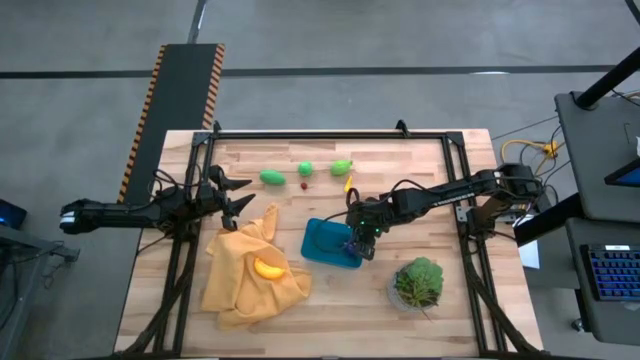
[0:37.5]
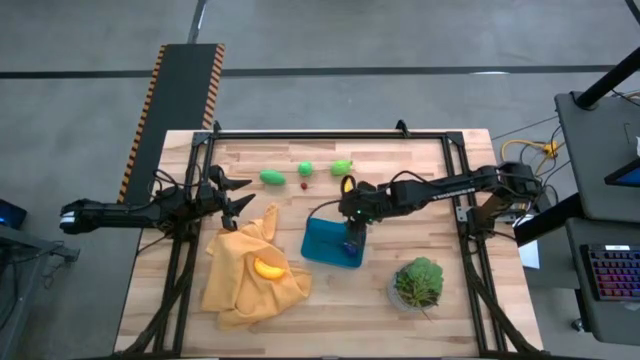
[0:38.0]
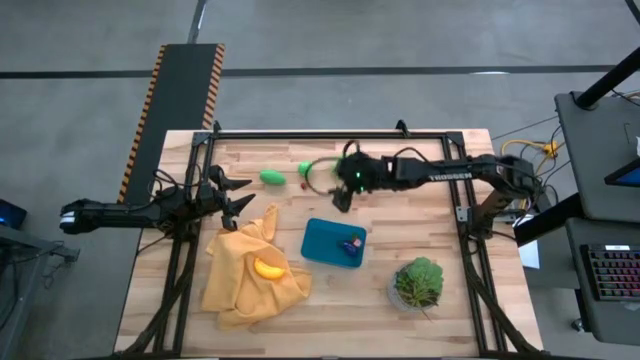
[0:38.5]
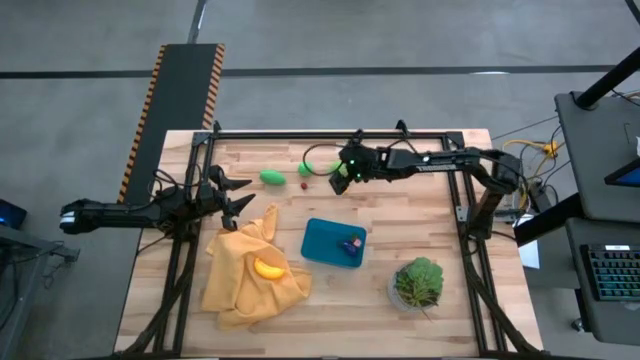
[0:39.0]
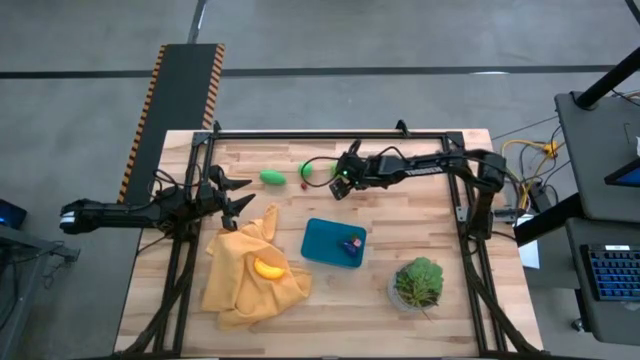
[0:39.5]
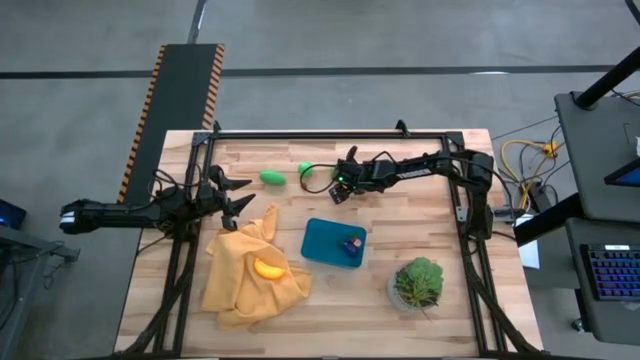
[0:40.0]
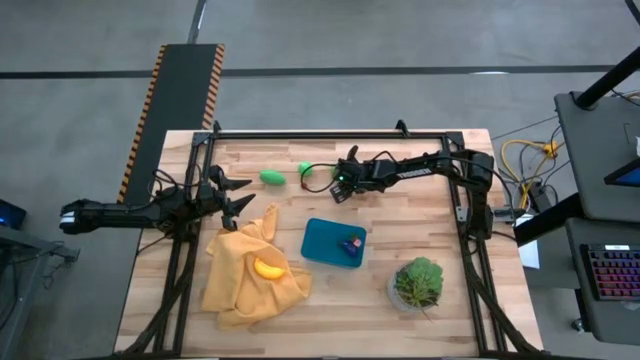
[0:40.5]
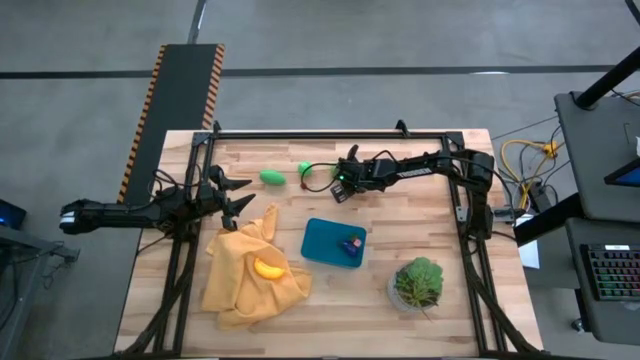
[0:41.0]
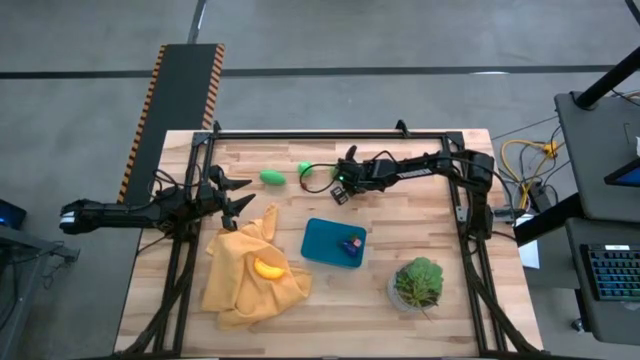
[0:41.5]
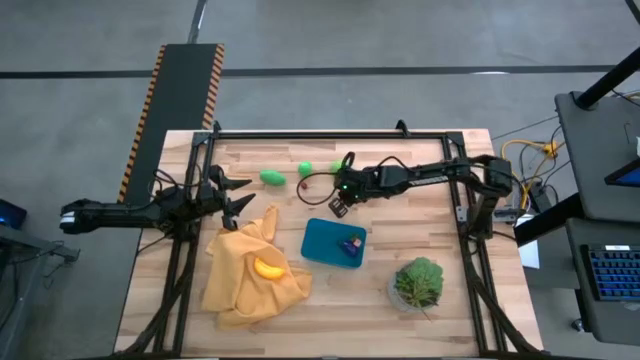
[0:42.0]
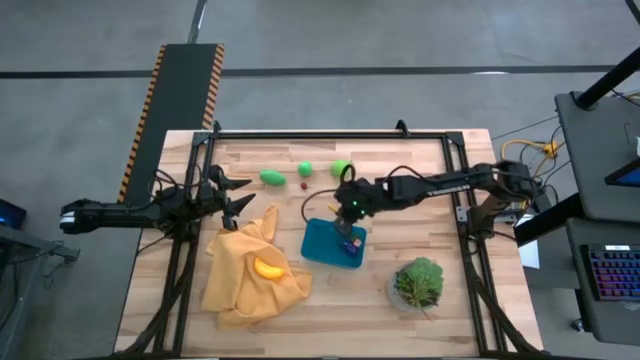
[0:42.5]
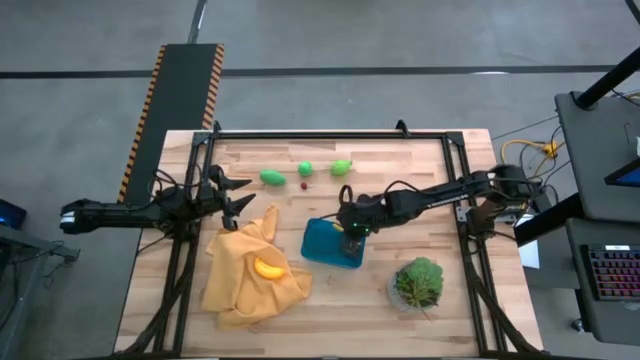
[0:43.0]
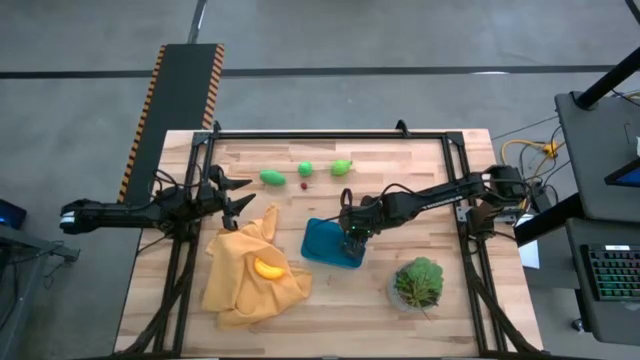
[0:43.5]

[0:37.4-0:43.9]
Task: Pick and placing Produce into tupperware
Put the yellow corn into the blue bin

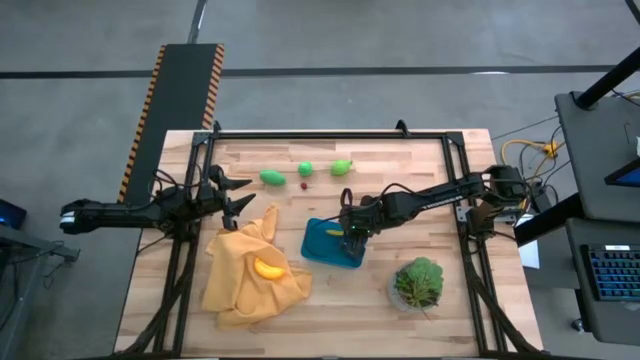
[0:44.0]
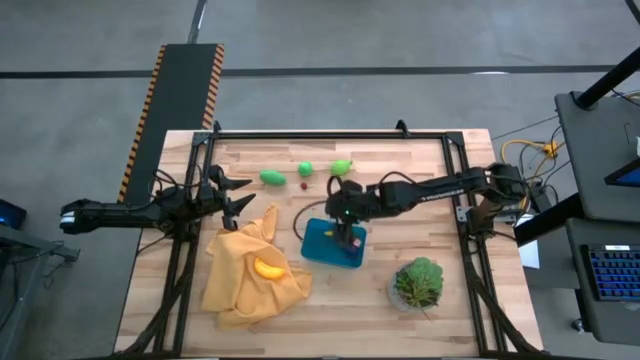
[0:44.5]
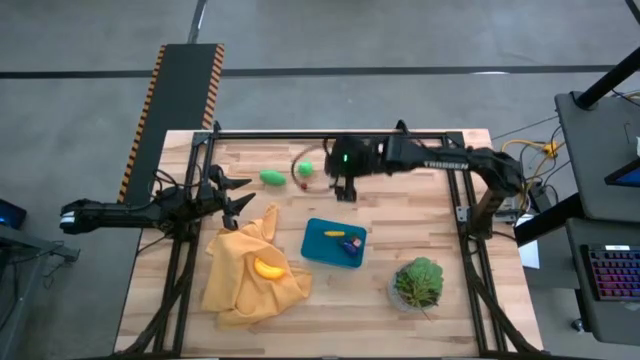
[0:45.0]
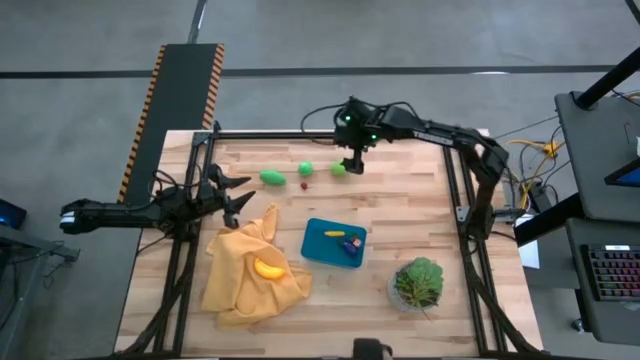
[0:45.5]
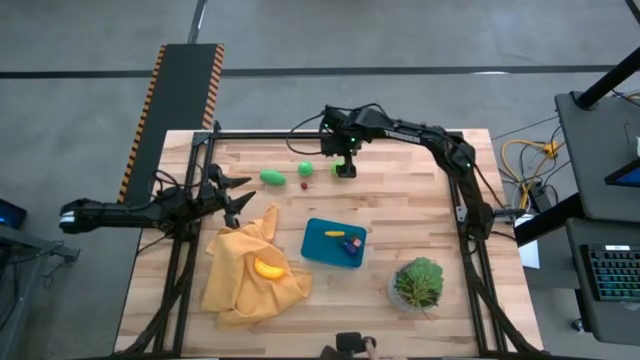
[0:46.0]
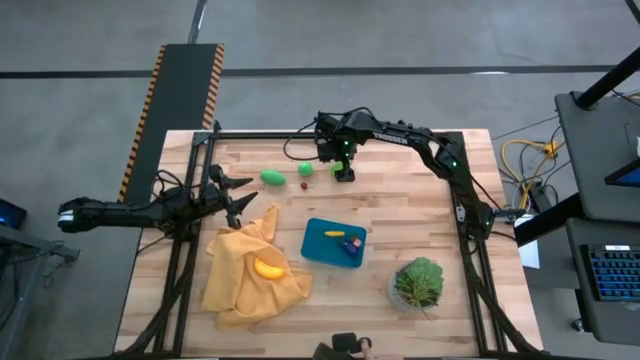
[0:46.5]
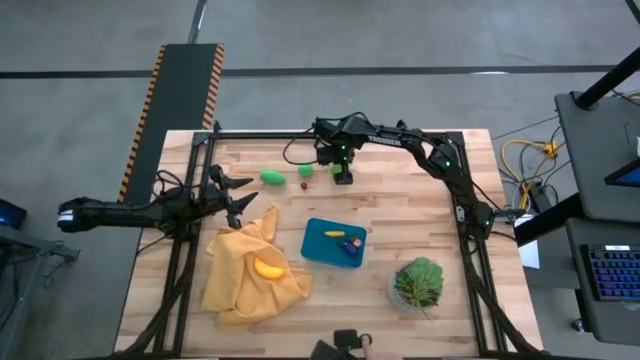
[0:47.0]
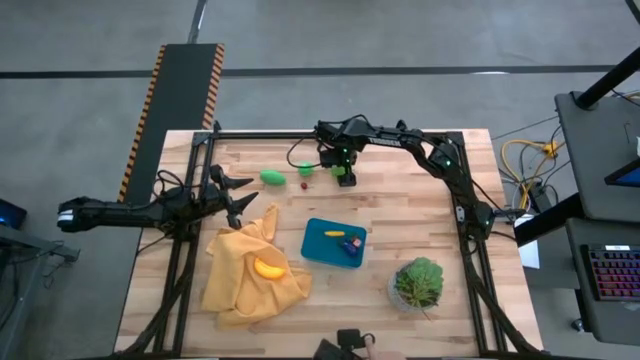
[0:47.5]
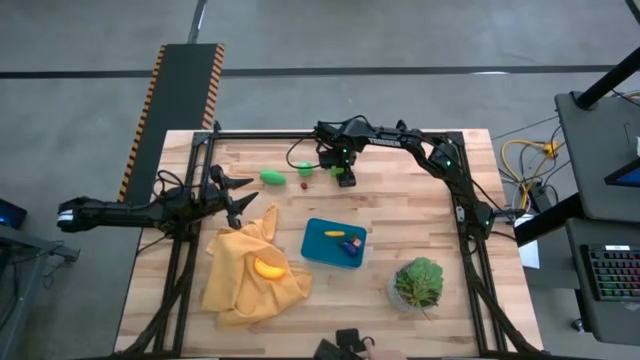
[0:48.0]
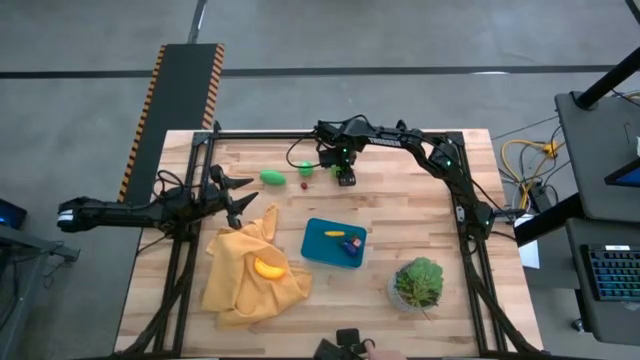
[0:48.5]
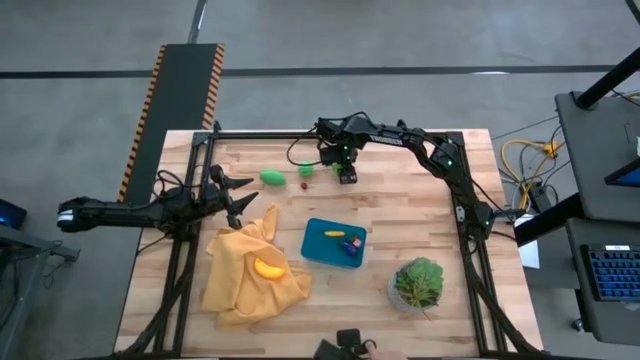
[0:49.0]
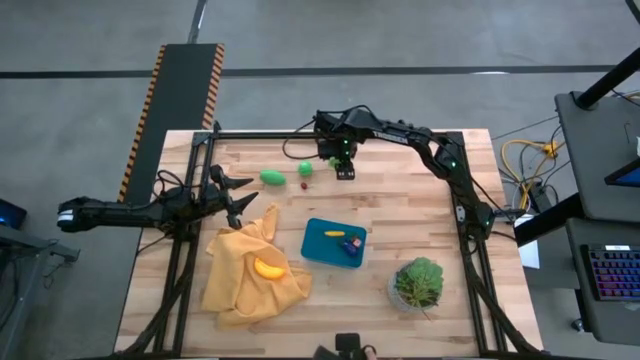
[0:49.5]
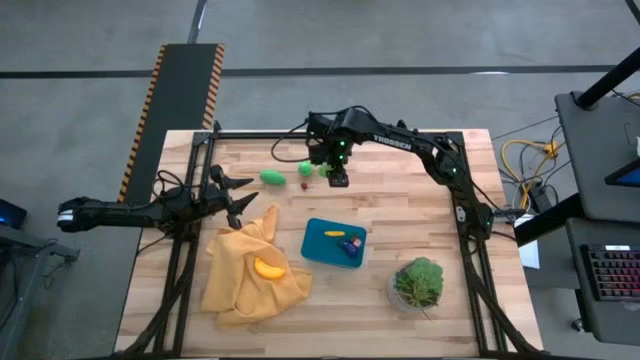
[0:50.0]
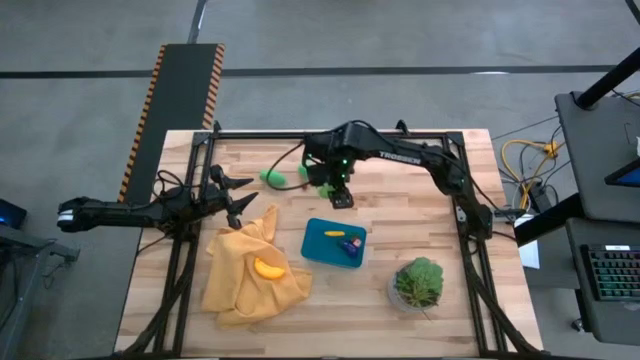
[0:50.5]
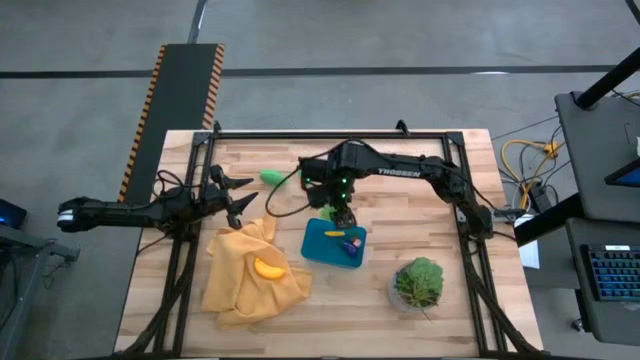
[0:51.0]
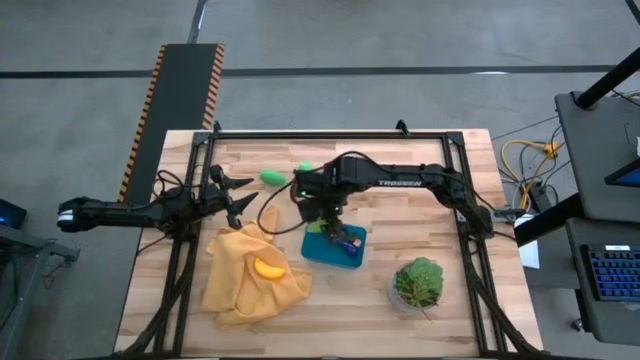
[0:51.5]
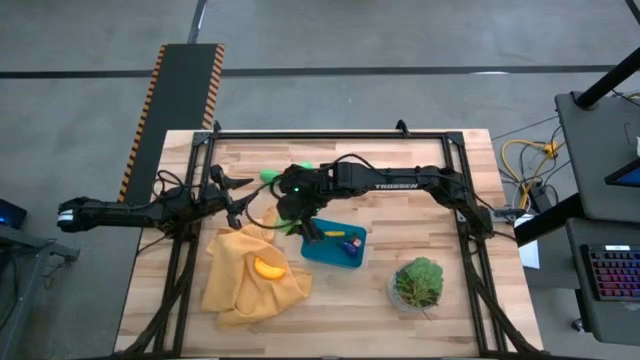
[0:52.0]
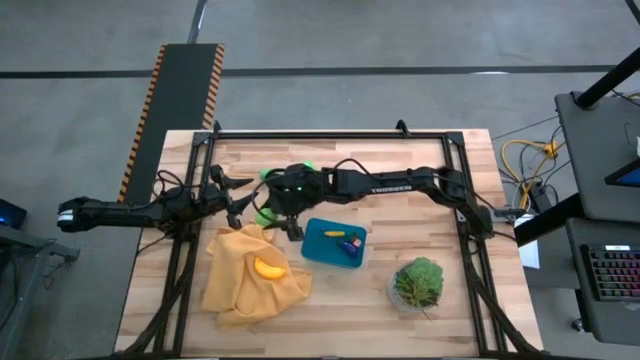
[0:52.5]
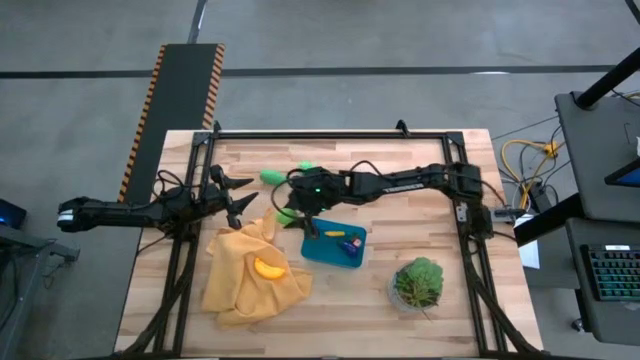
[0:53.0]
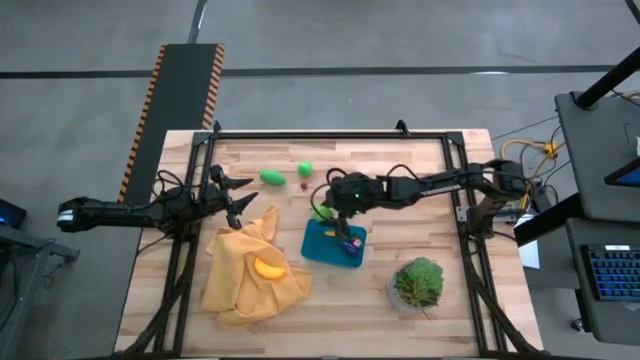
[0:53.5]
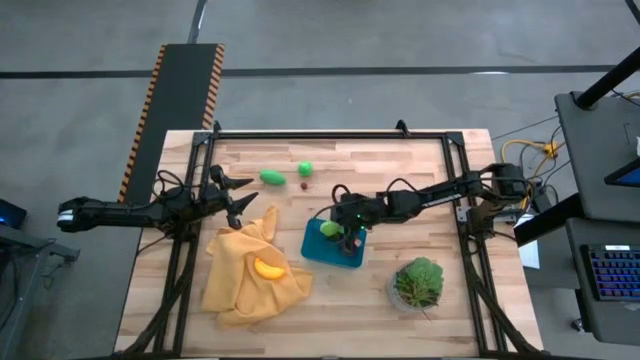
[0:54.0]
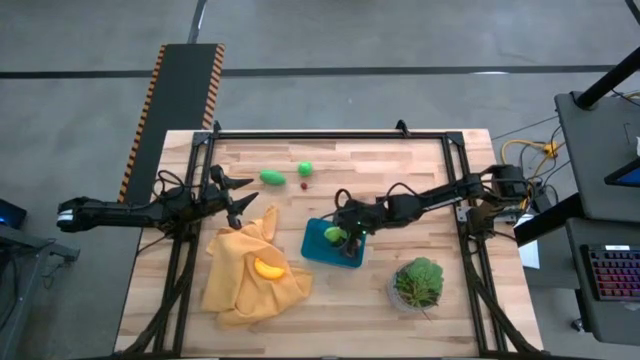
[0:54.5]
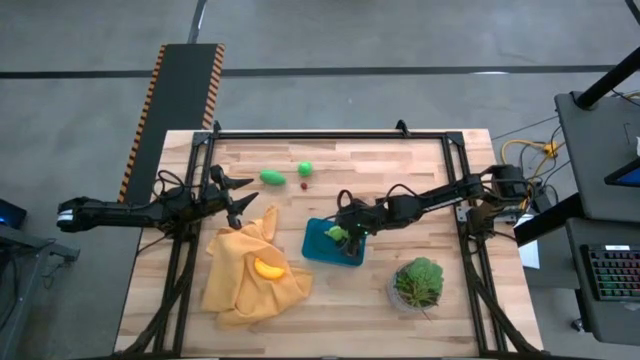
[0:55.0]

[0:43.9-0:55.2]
Put the melon into the blue bin

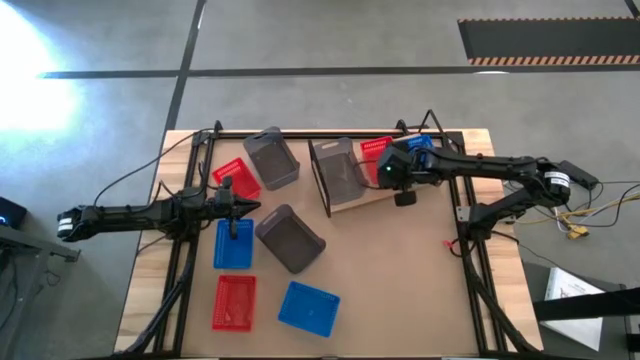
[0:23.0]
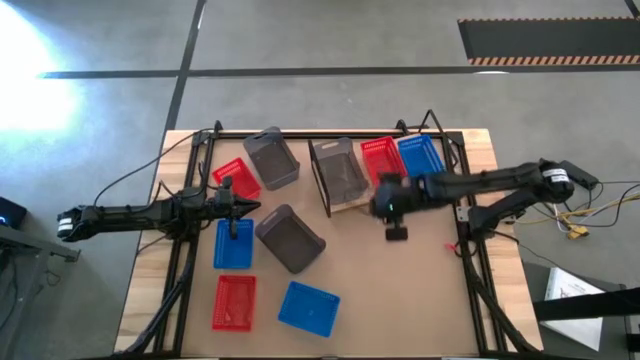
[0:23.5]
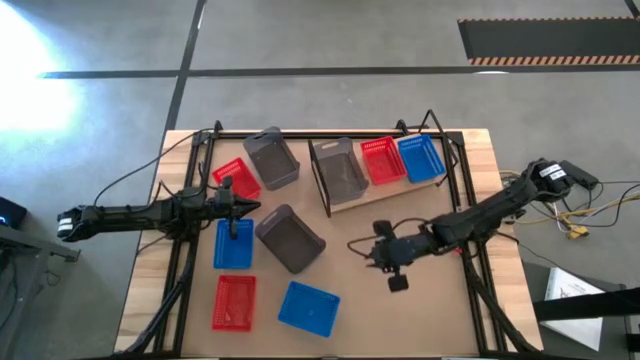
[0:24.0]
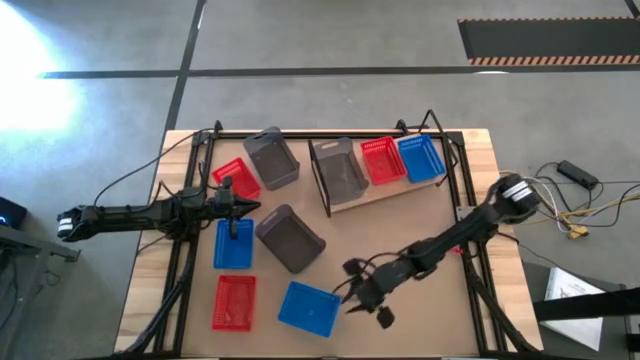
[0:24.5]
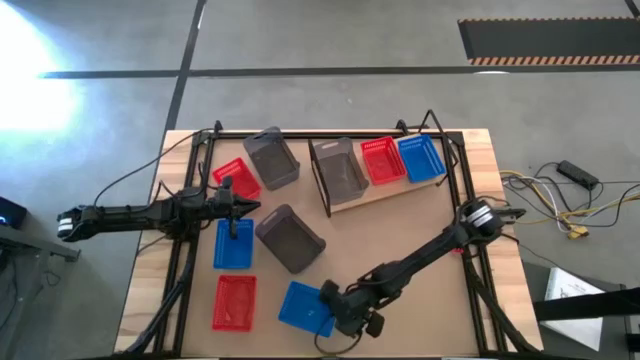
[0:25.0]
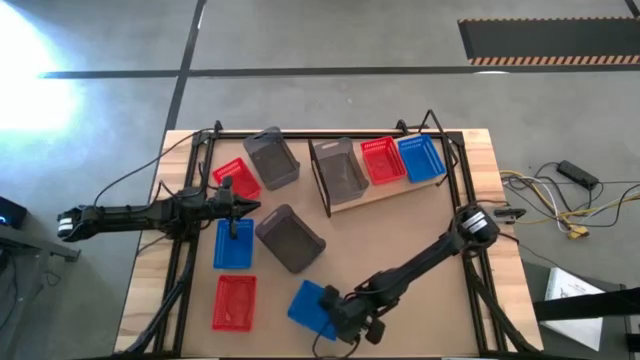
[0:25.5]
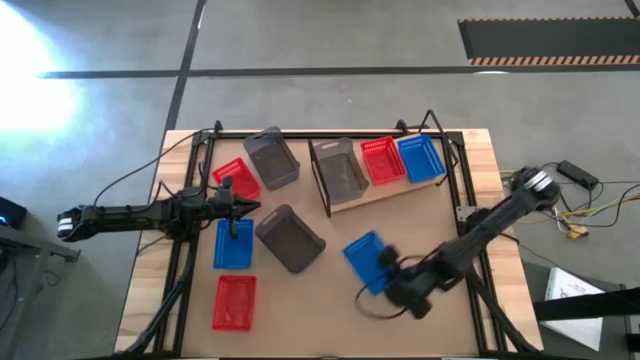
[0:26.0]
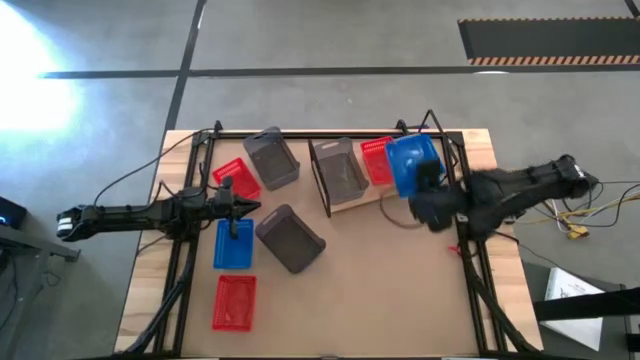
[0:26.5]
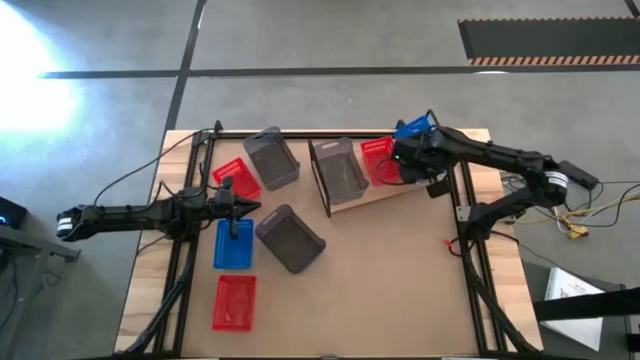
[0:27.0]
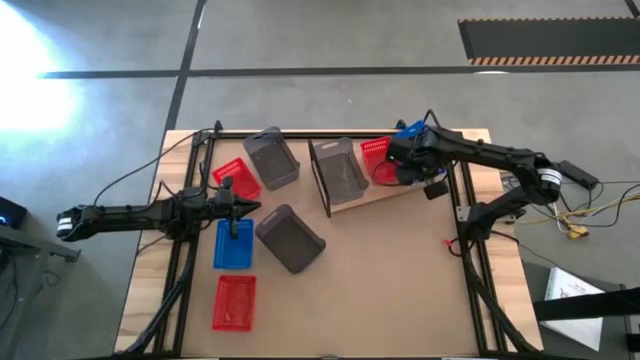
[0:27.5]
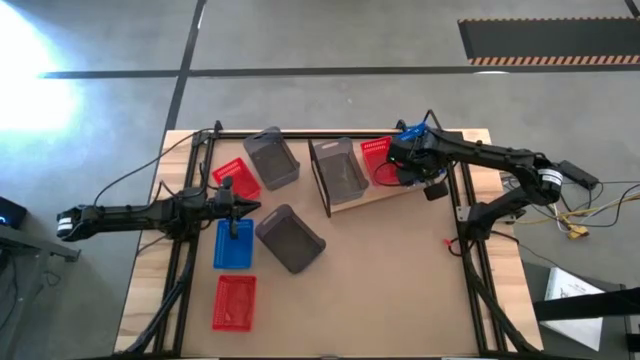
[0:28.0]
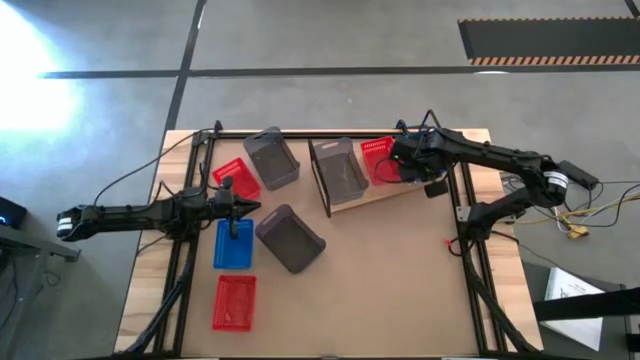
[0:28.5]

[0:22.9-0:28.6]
Task: Stack baskets on shelf by color
Stack the bottom blue bin on the other blue bin on the shelf
